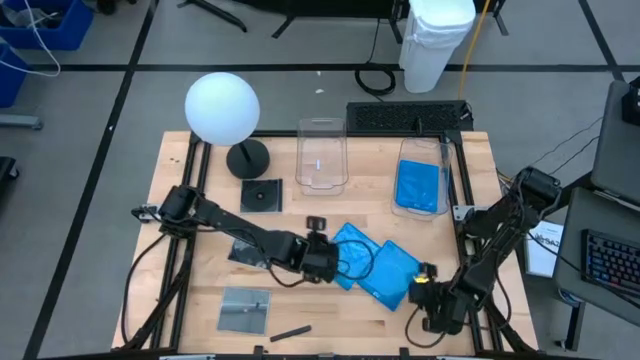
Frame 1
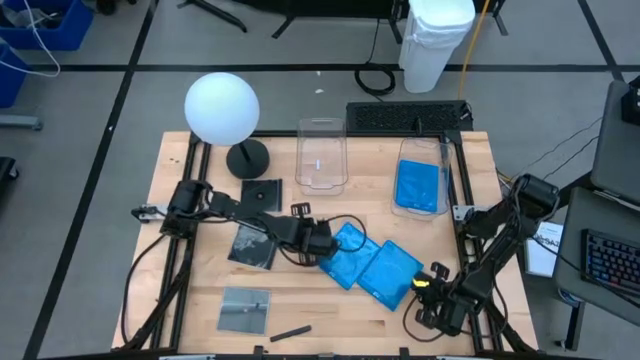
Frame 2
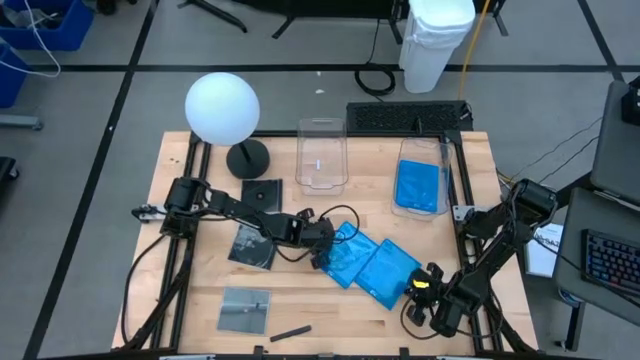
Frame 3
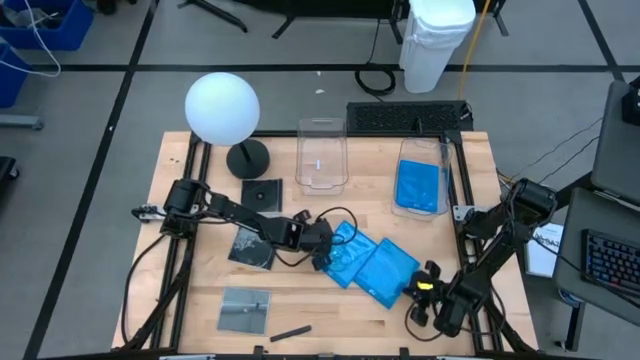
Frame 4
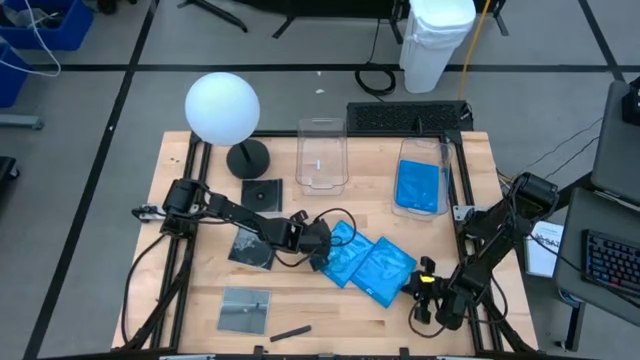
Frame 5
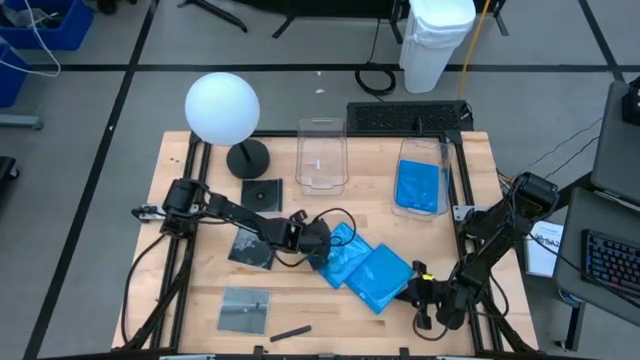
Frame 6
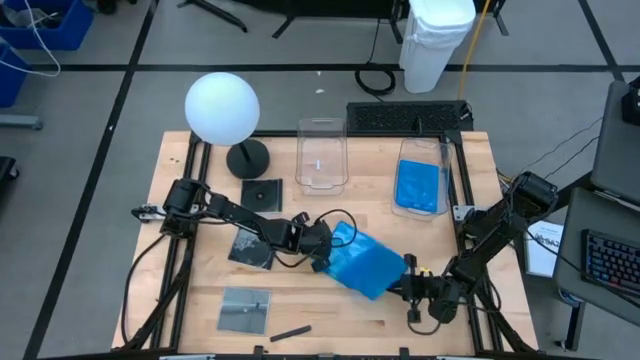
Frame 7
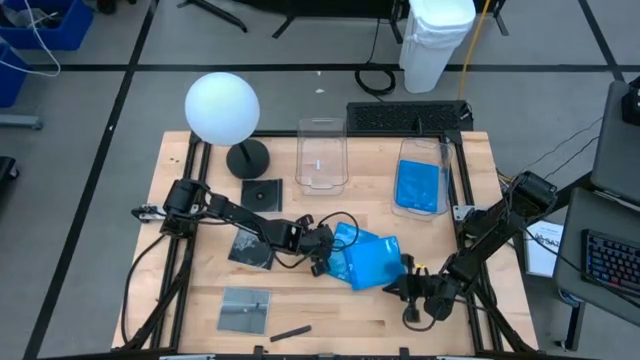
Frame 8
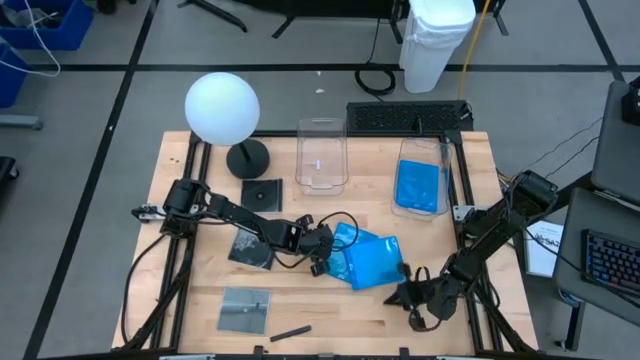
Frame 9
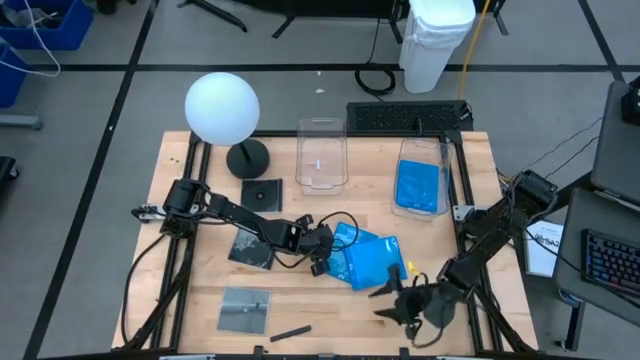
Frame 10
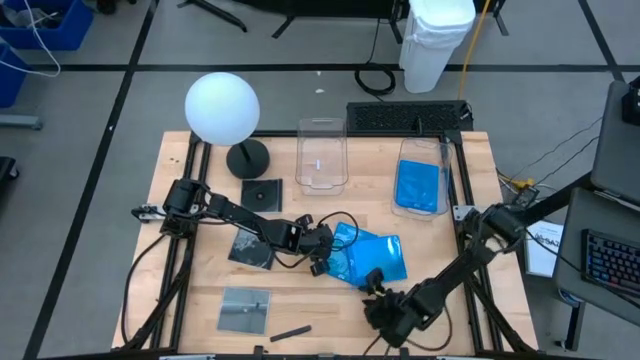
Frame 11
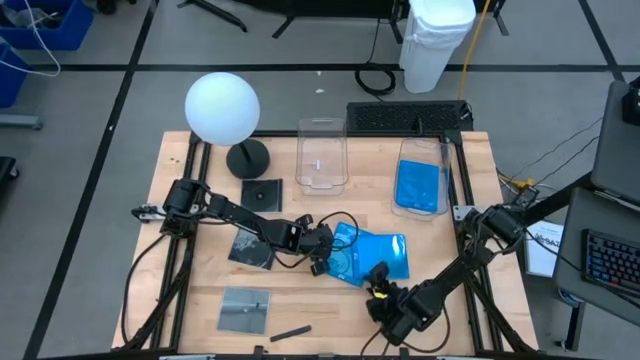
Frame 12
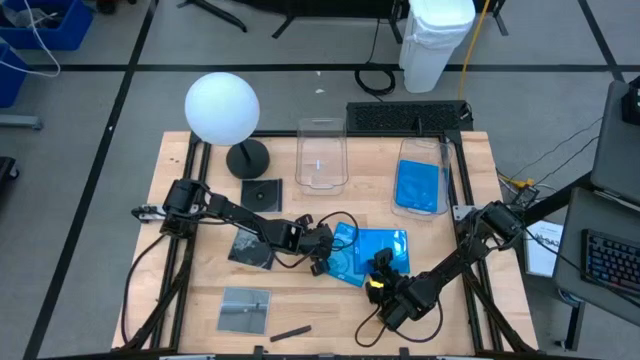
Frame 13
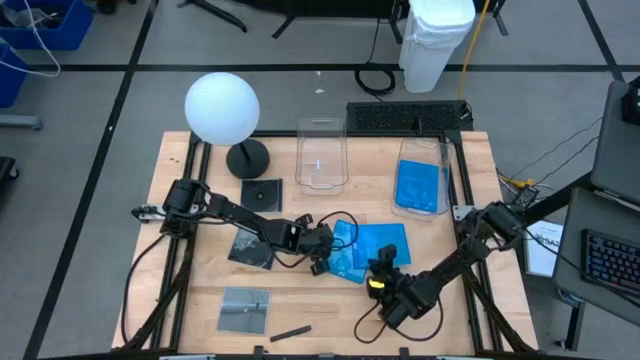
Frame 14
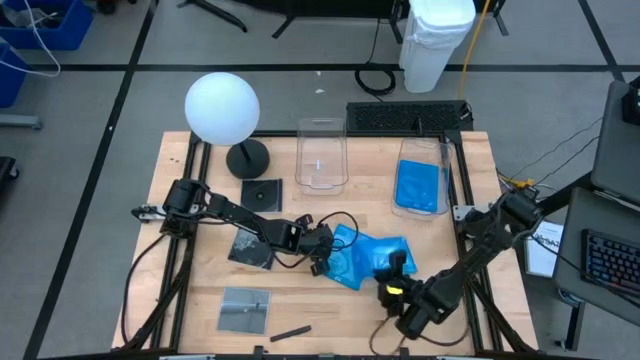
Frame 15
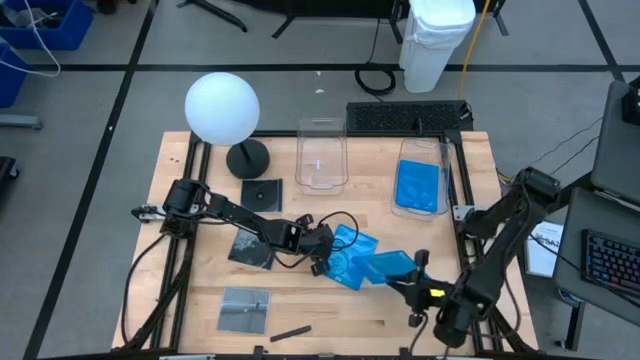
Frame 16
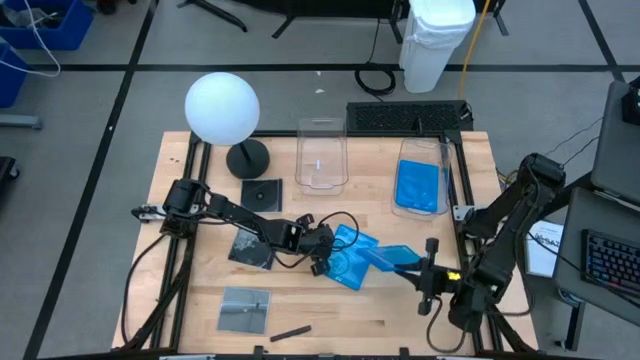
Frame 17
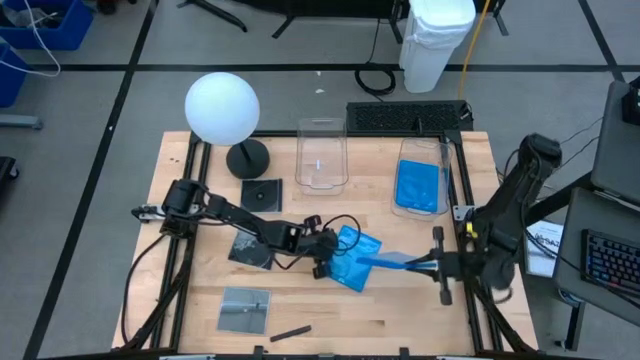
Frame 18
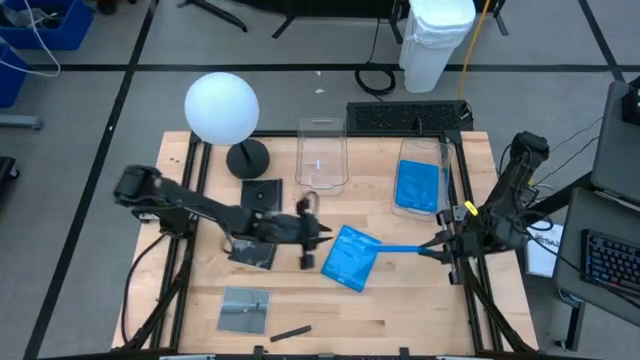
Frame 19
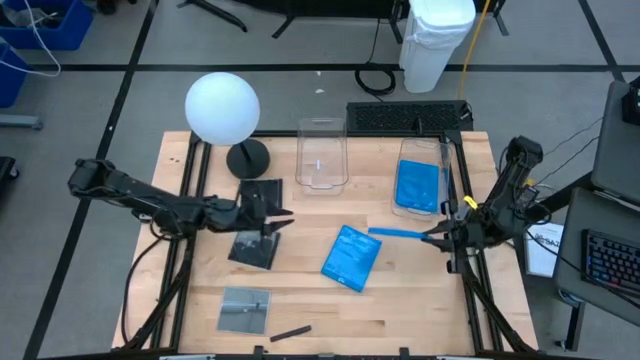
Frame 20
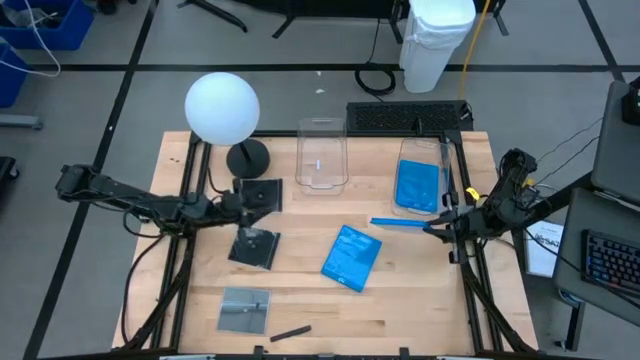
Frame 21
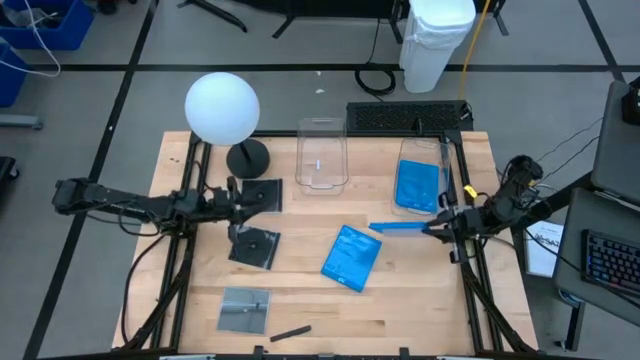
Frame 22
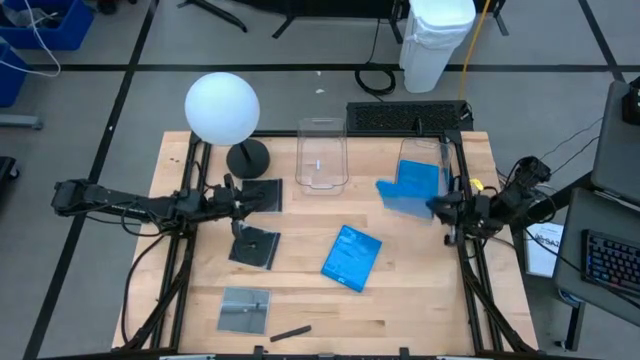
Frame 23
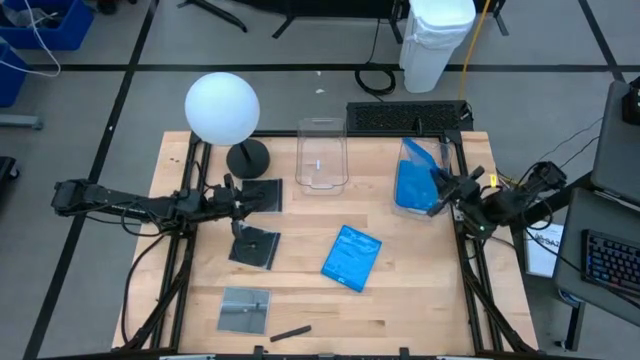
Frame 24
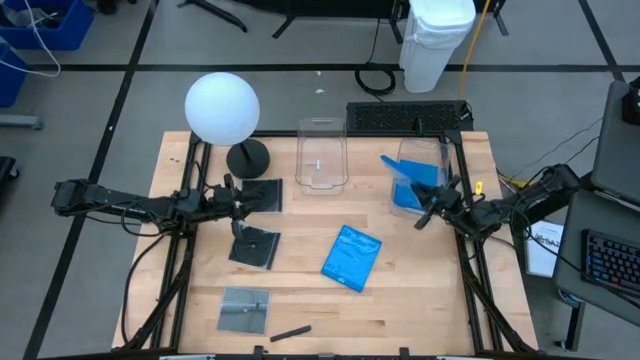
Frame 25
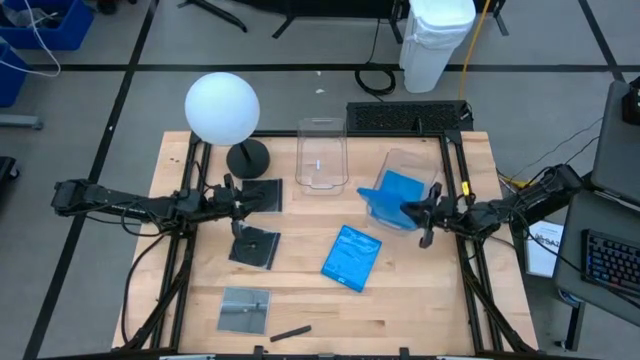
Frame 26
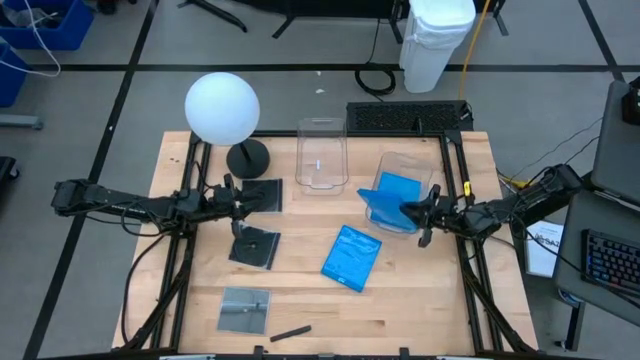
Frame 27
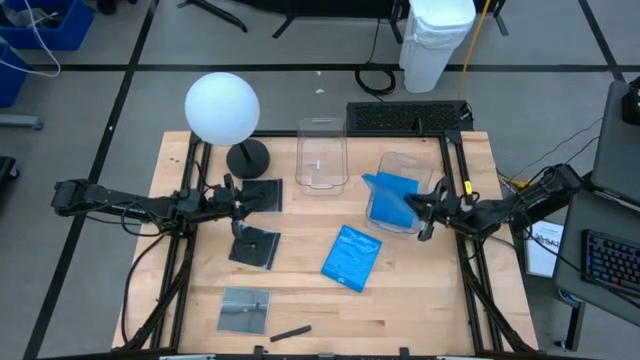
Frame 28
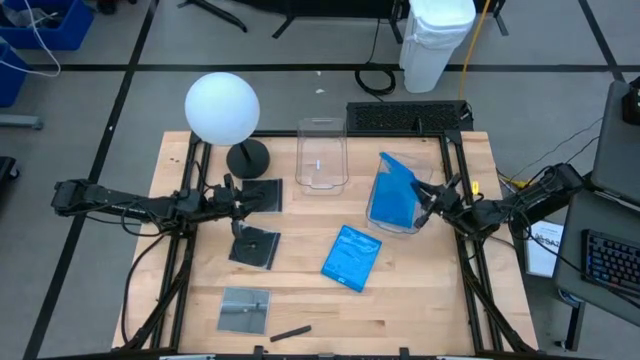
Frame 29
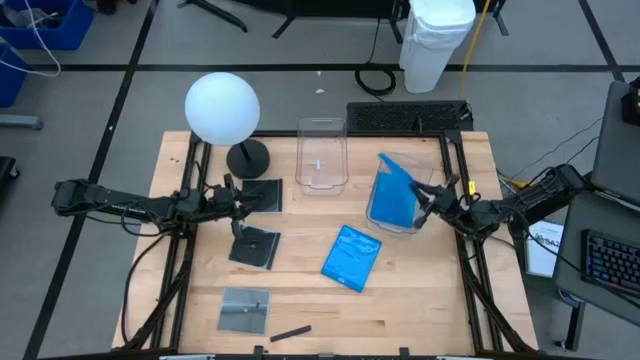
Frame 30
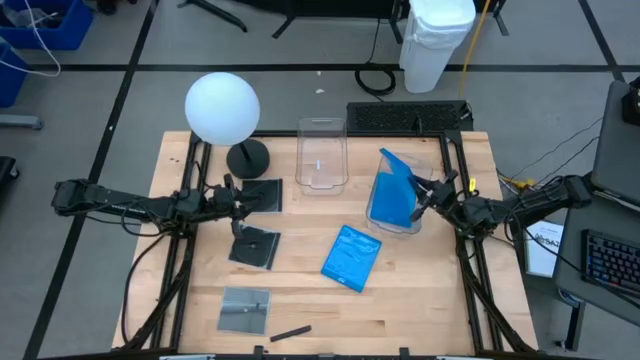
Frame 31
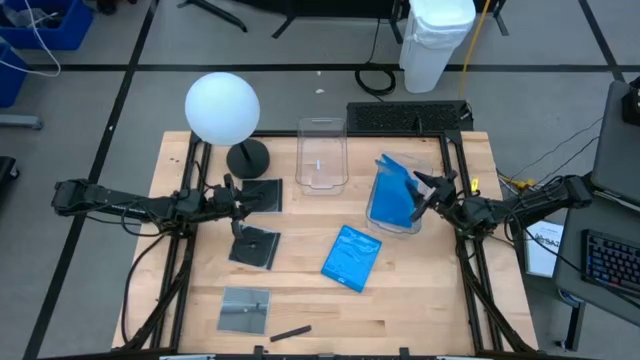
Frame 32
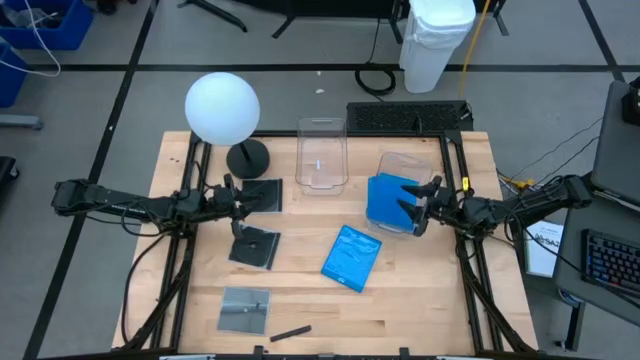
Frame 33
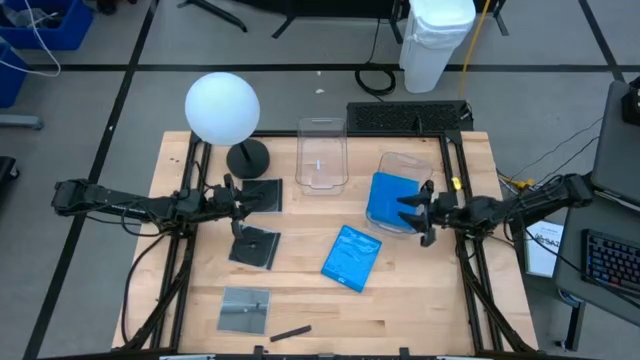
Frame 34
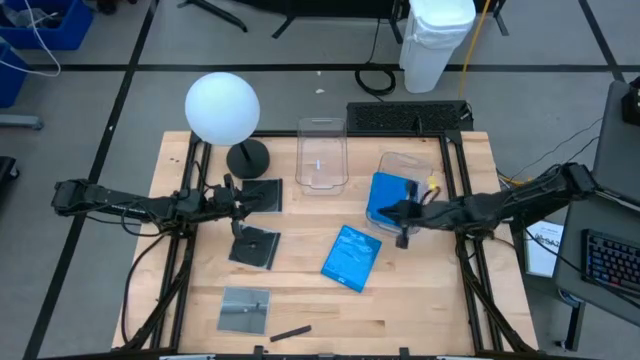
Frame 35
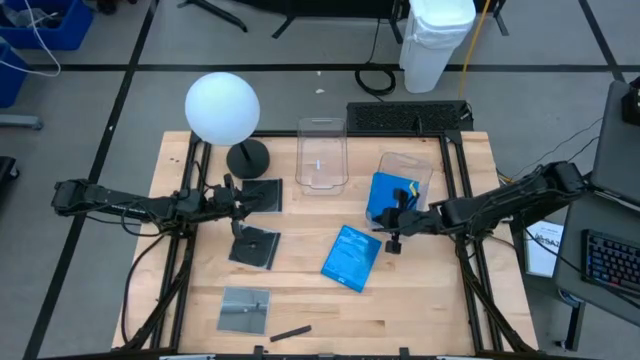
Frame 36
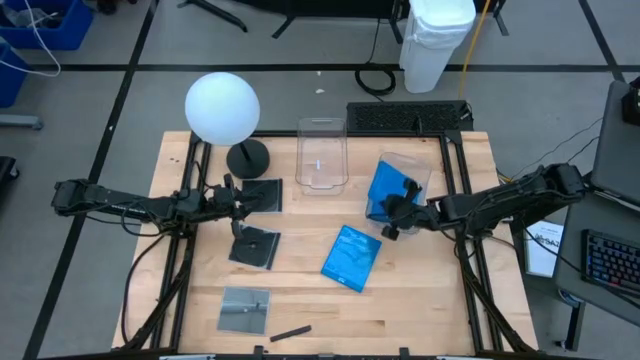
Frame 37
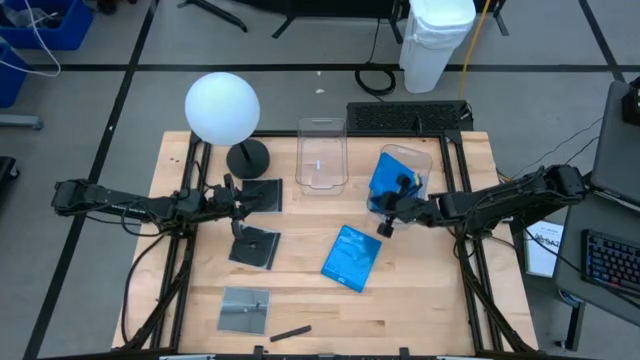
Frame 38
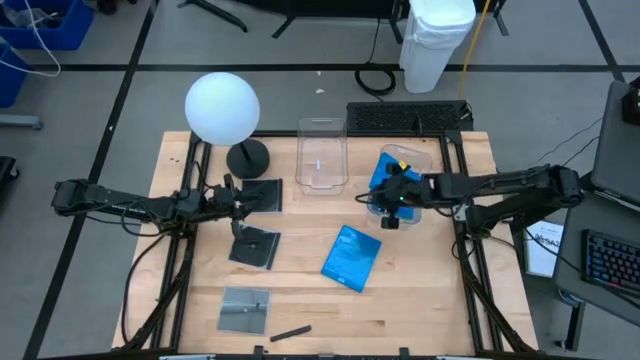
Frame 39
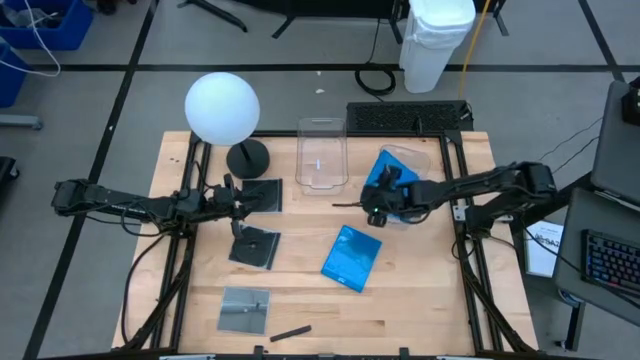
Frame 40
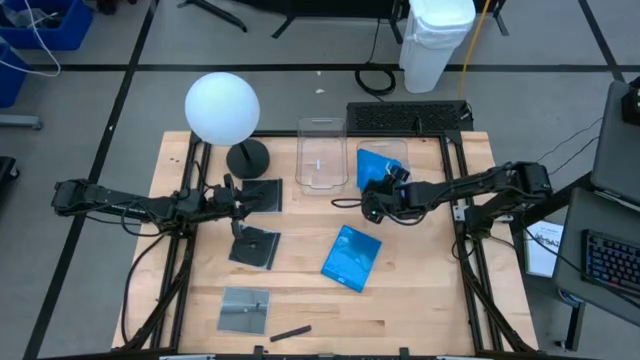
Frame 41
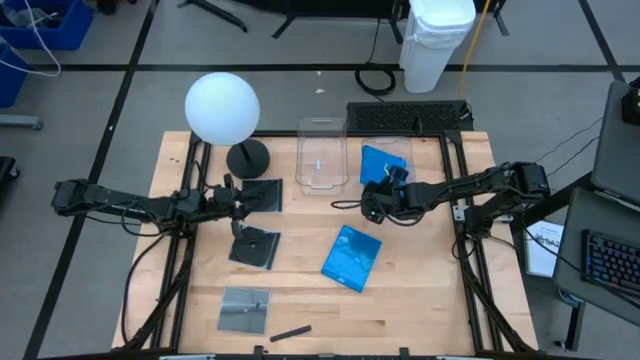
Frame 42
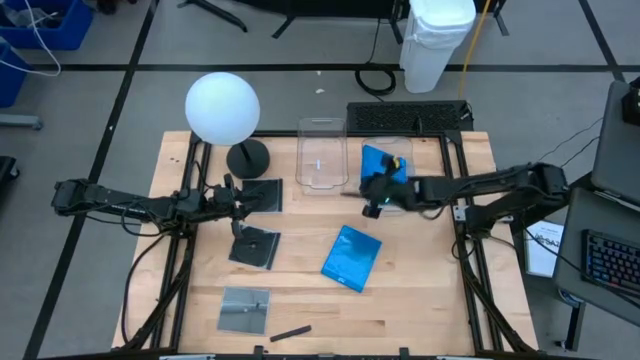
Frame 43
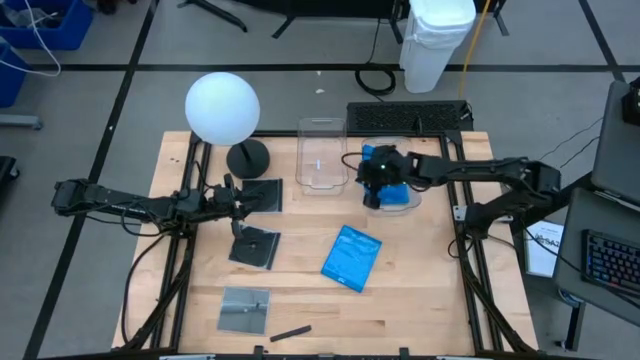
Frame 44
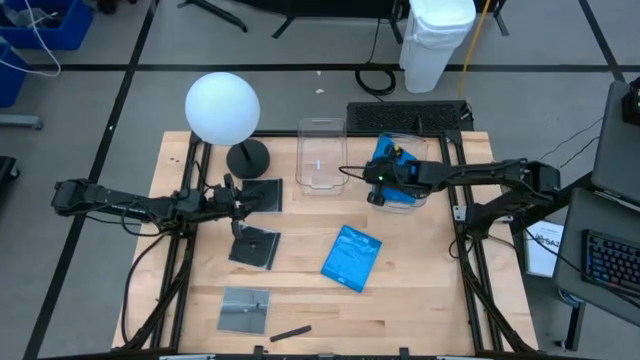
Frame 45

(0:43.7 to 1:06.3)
Task: Pick & place jewel cases by type
Put the right blue CD case into the right transparent bin
